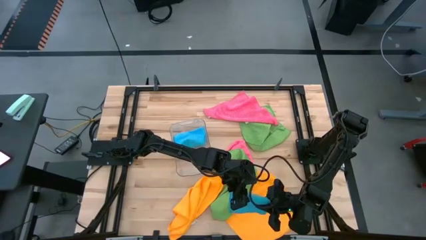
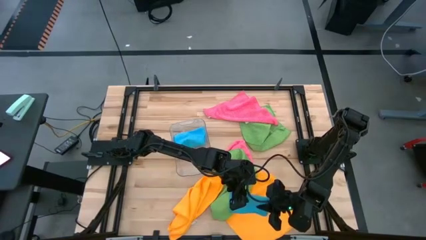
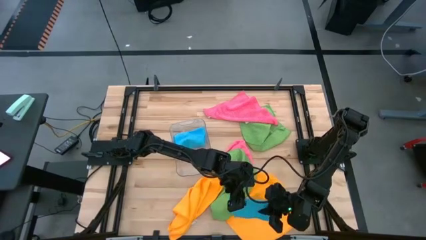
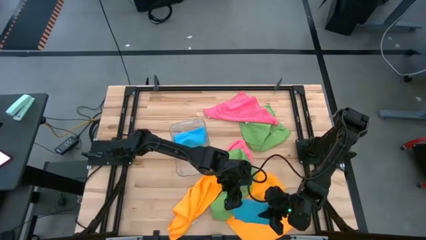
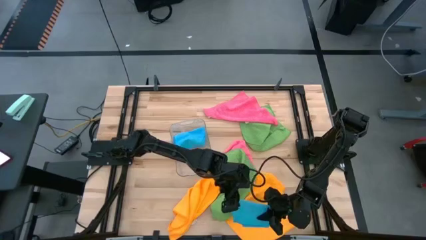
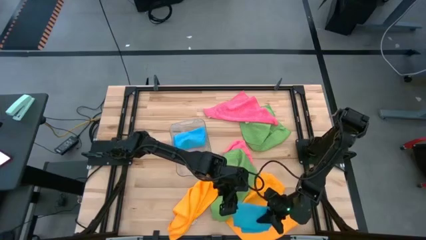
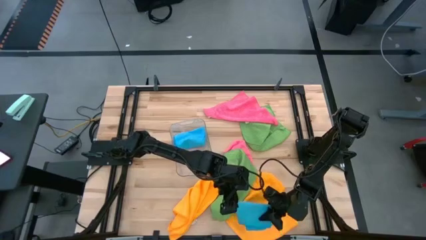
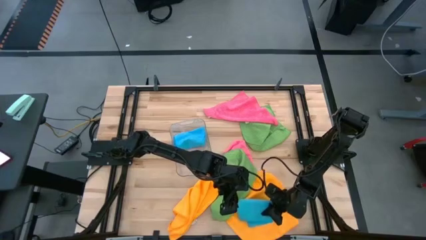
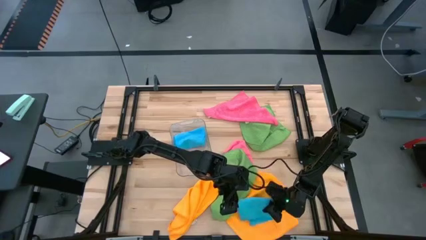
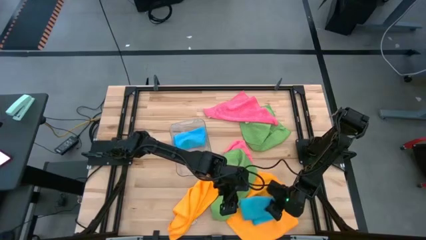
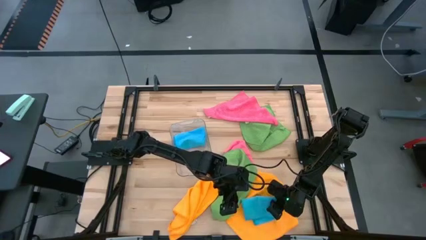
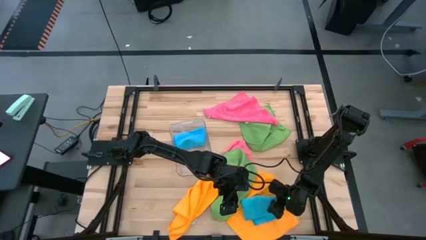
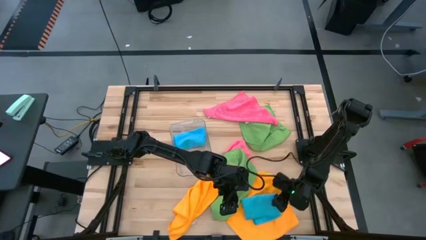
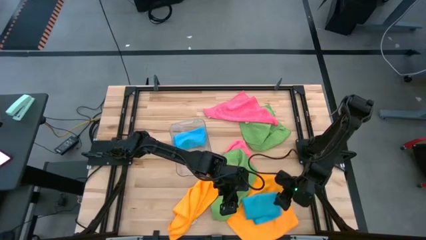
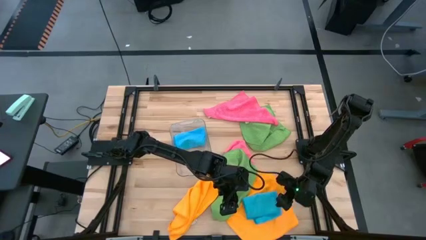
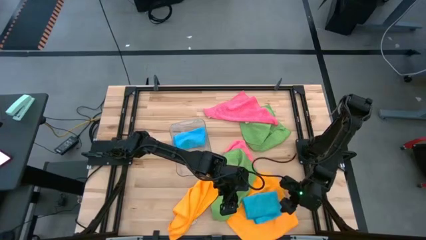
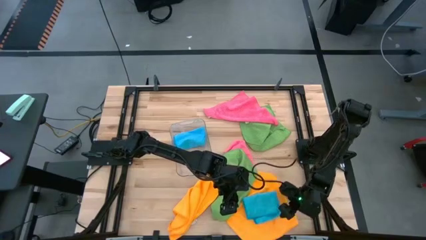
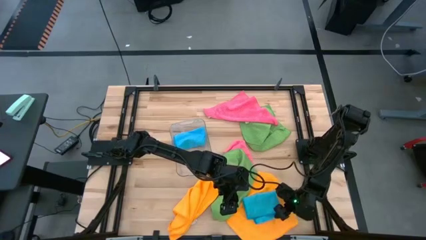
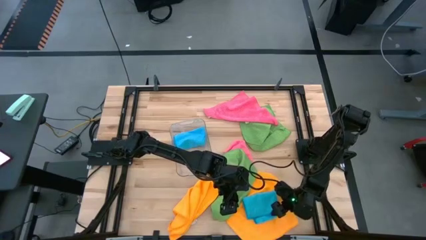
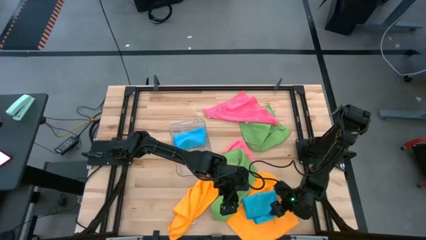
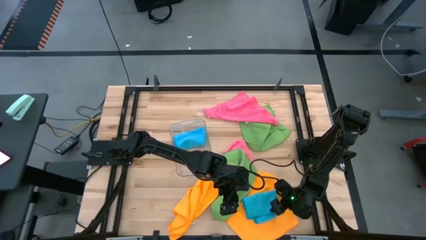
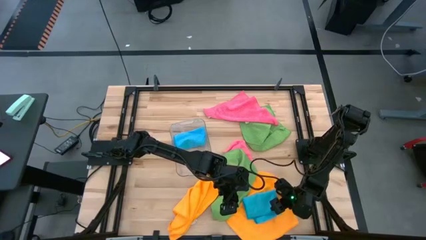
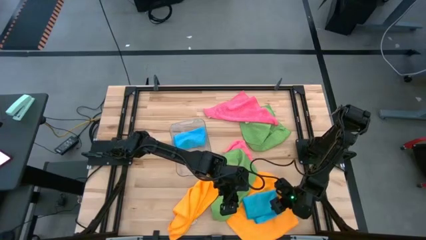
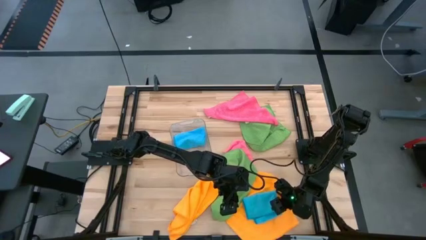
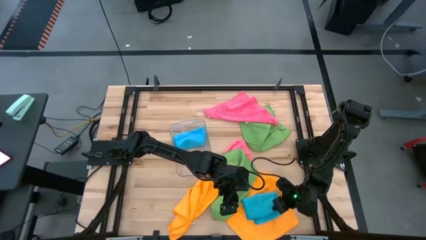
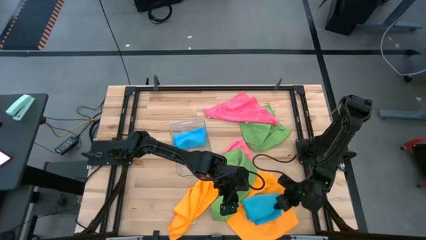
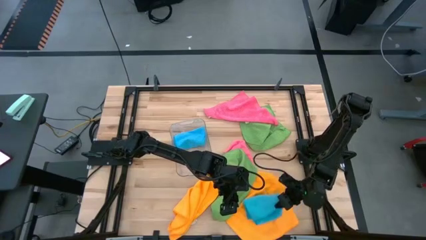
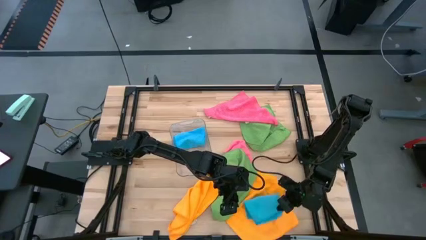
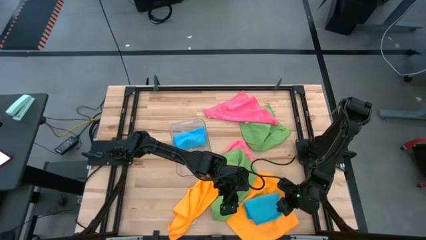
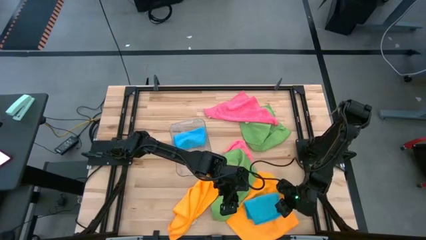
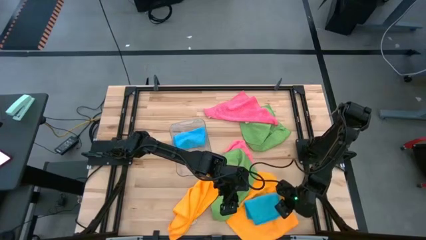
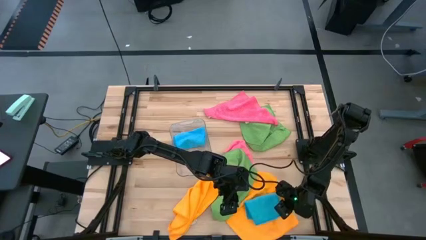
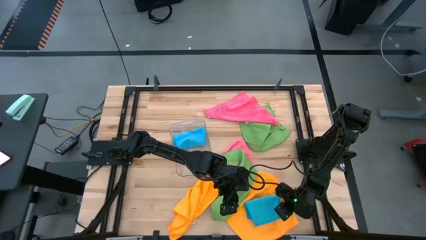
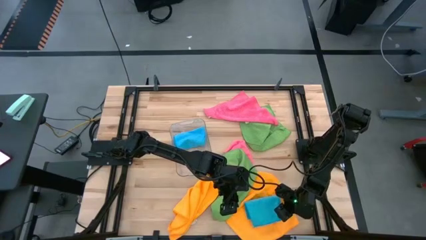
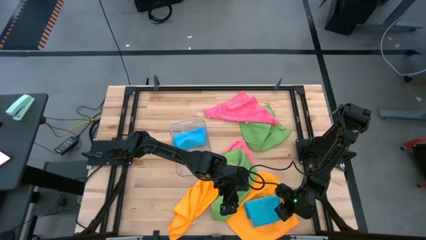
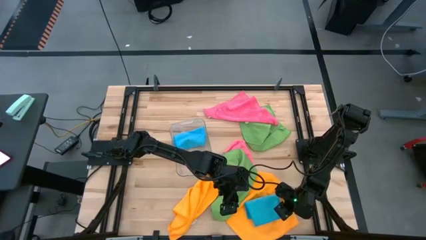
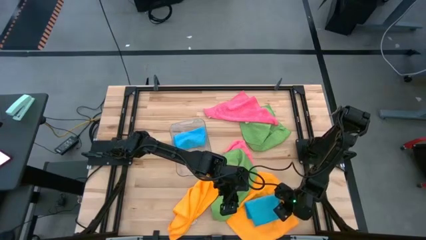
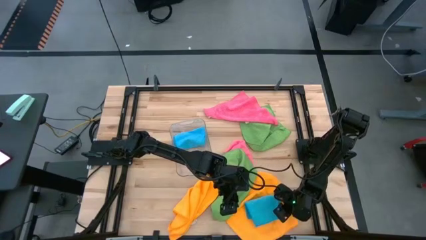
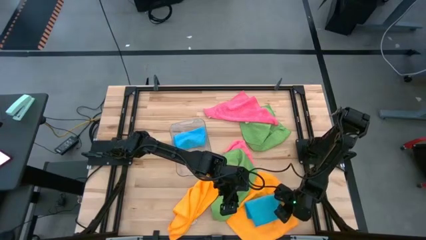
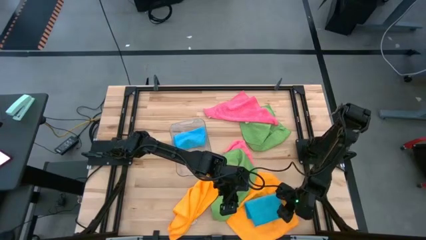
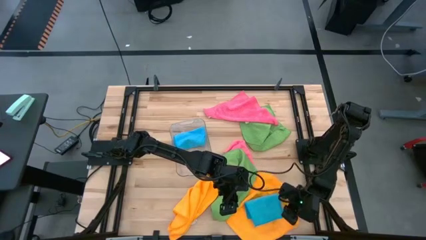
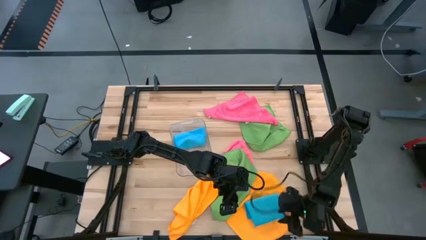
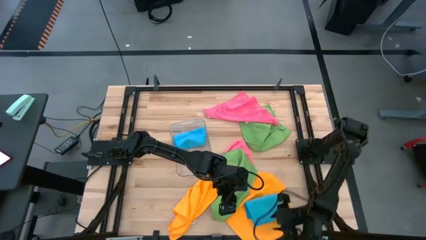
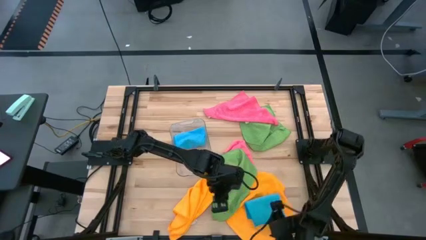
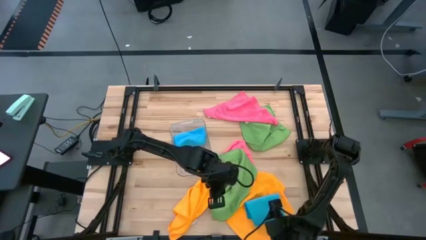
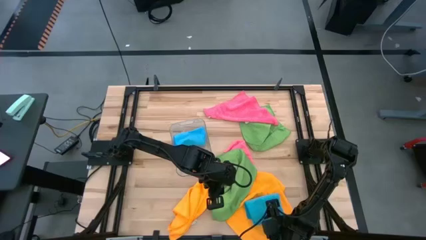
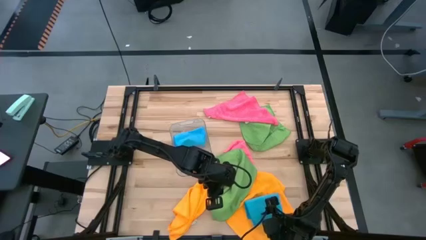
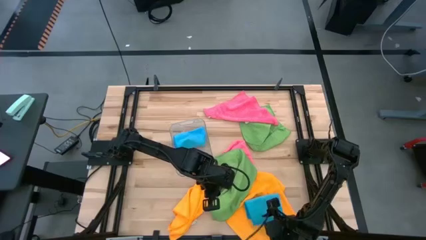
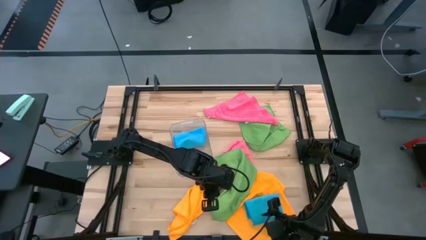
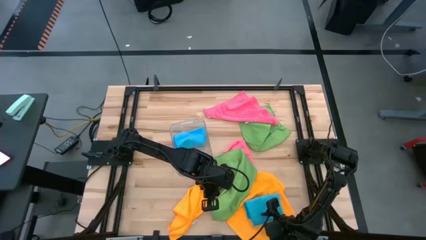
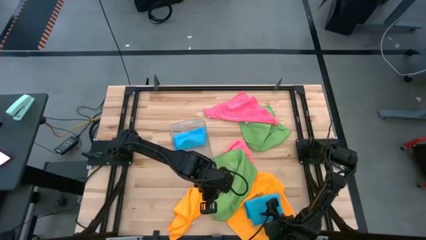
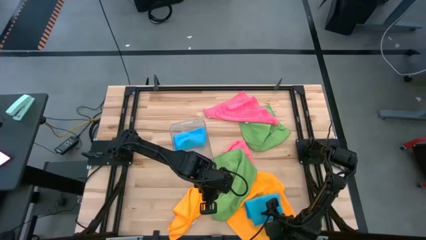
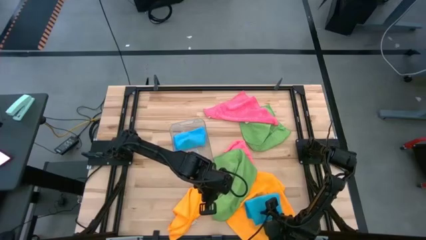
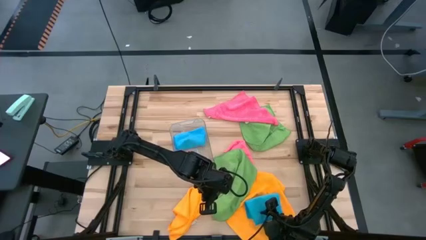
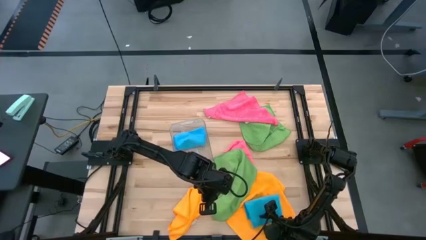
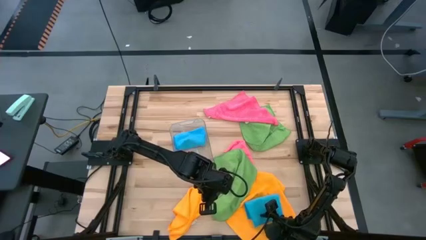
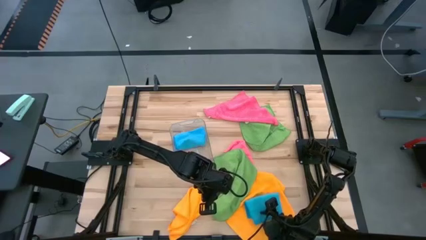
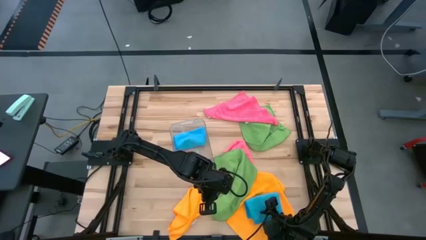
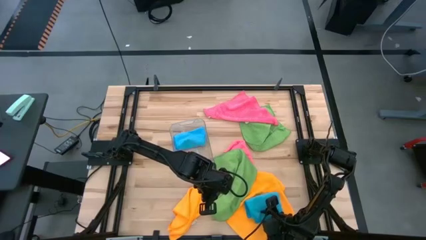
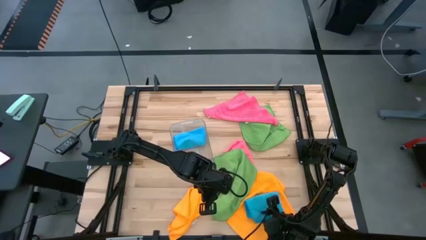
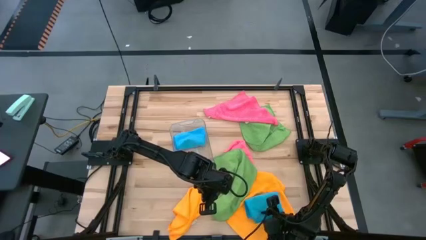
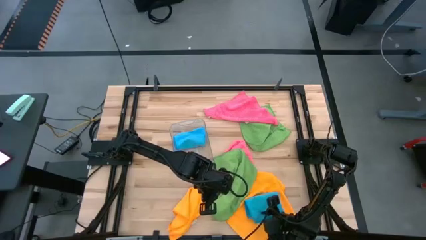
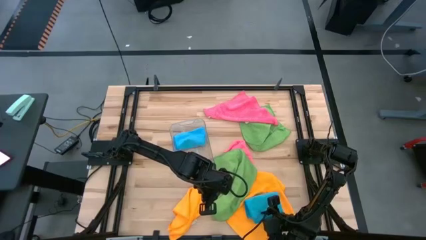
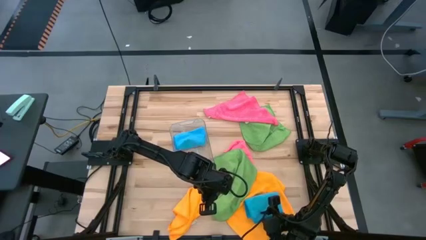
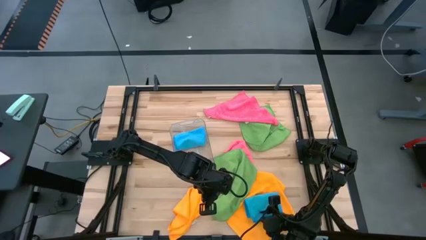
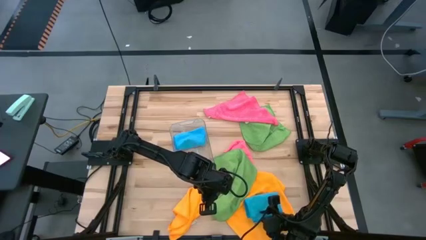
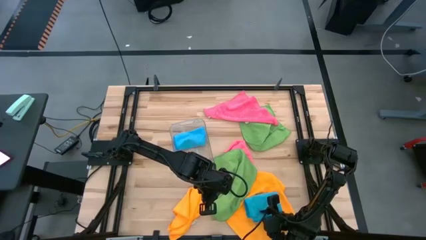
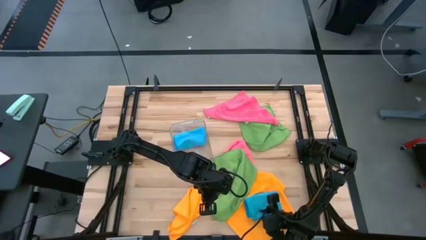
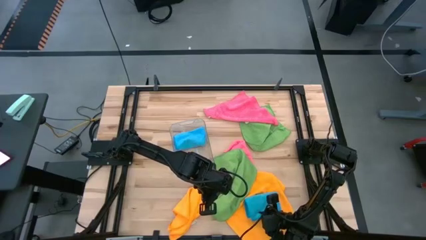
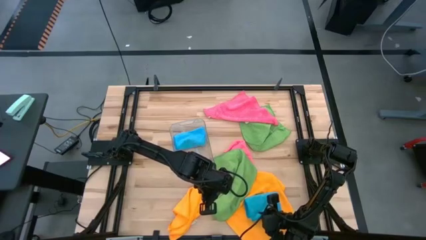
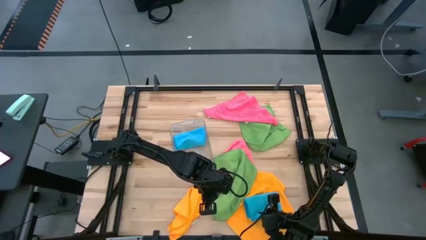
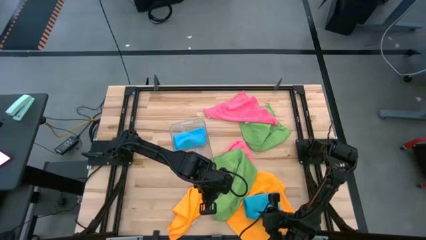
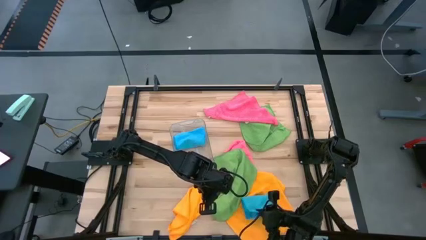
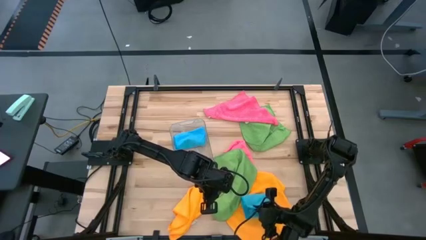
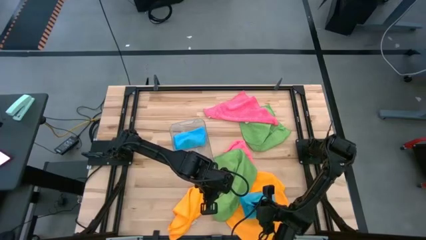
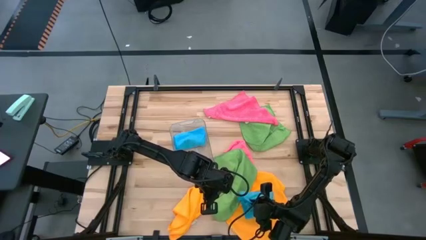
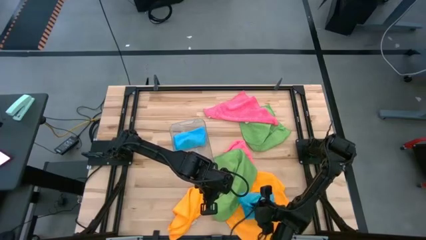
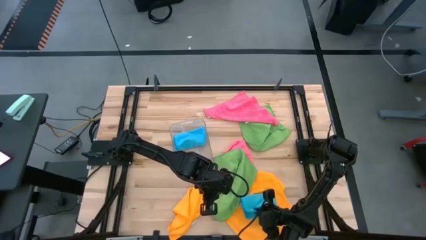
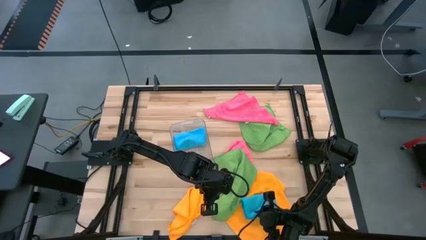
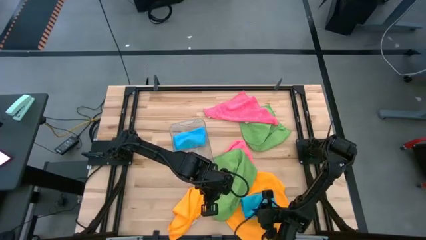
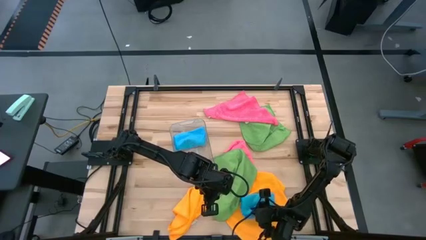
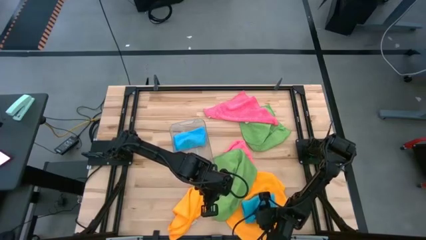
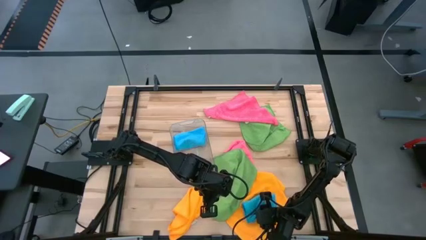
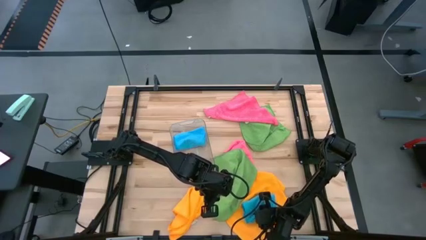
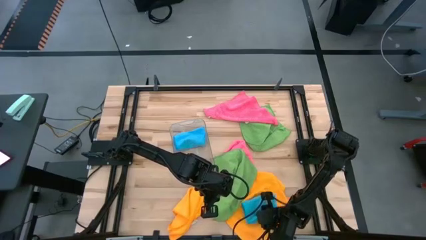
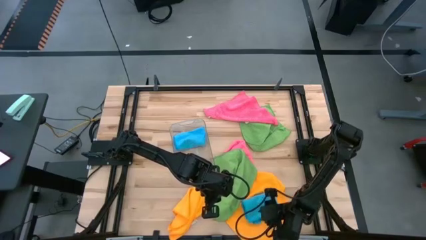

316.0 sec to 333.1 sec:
Task: Fold microfiber towels
Fold the blue towel
